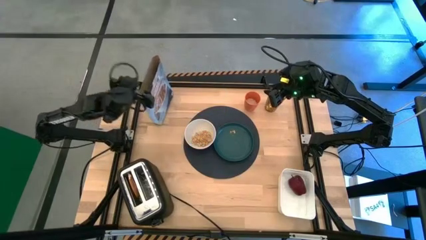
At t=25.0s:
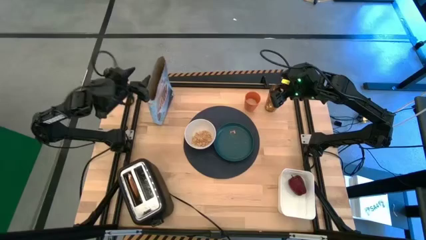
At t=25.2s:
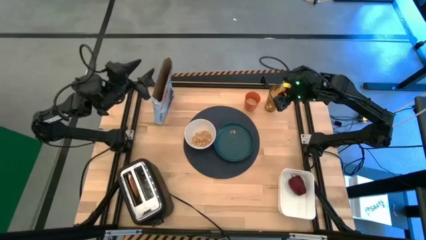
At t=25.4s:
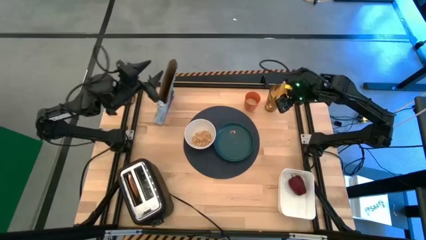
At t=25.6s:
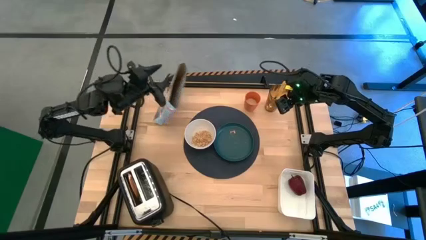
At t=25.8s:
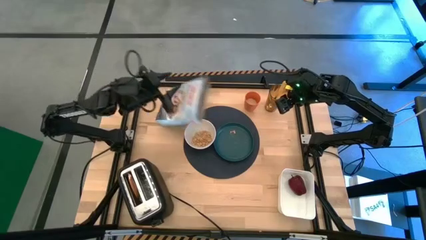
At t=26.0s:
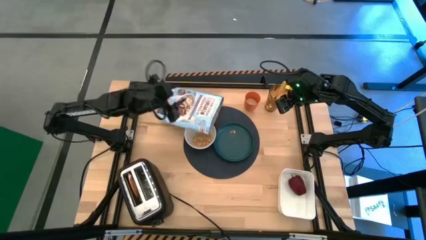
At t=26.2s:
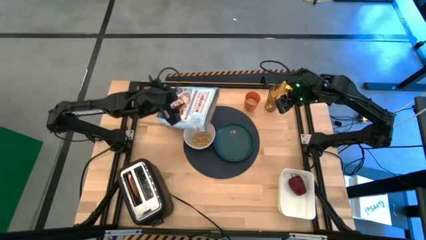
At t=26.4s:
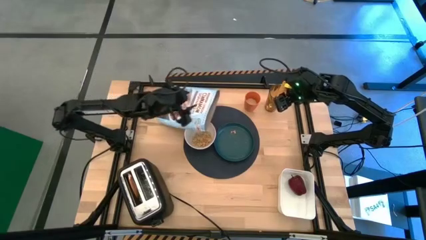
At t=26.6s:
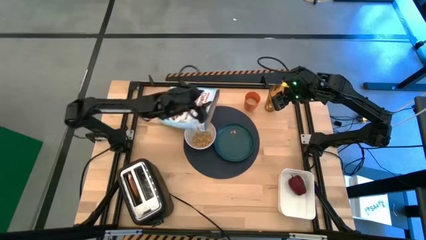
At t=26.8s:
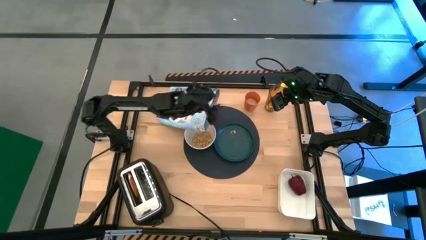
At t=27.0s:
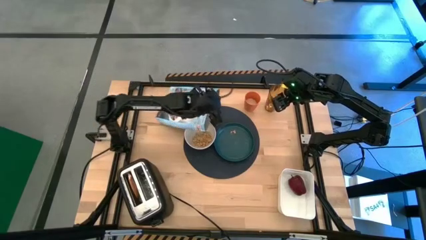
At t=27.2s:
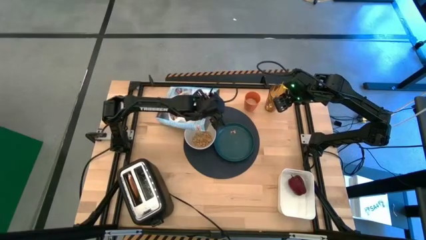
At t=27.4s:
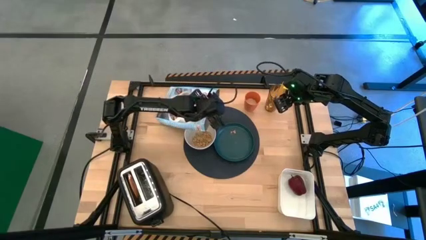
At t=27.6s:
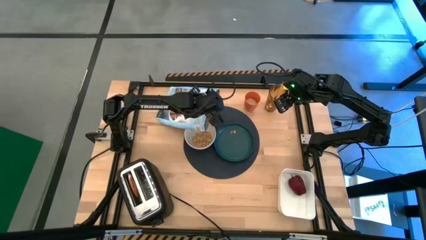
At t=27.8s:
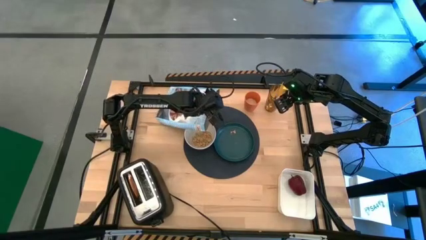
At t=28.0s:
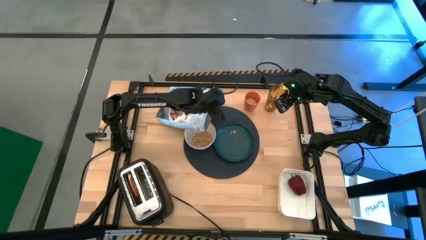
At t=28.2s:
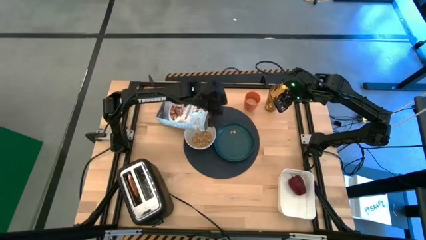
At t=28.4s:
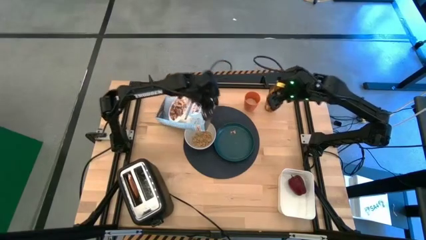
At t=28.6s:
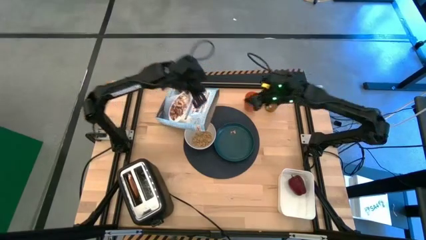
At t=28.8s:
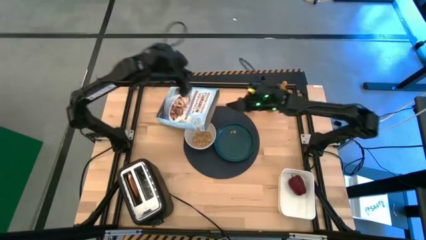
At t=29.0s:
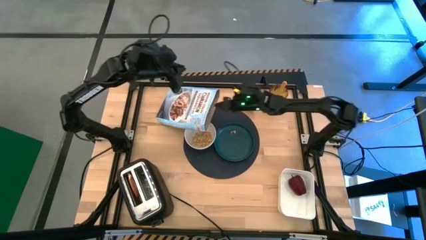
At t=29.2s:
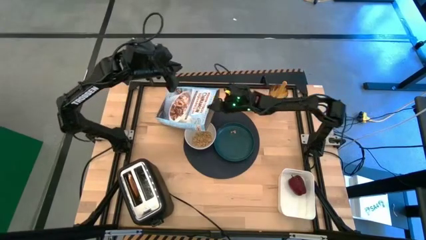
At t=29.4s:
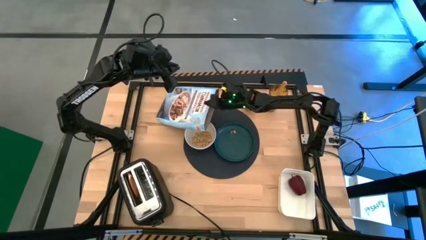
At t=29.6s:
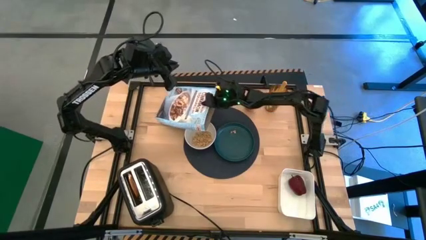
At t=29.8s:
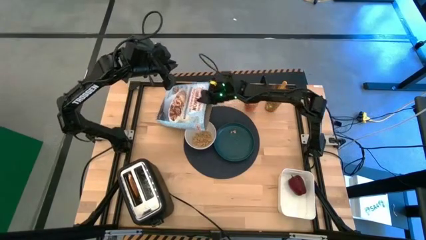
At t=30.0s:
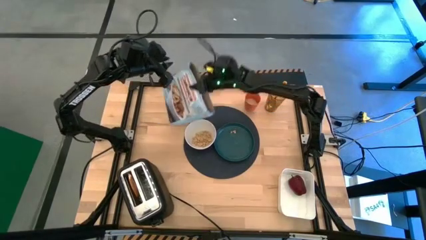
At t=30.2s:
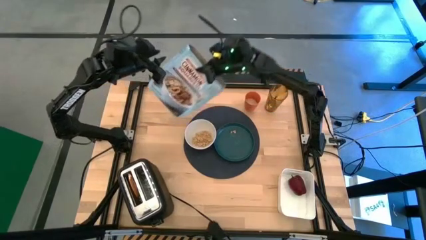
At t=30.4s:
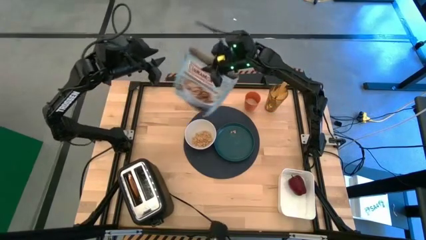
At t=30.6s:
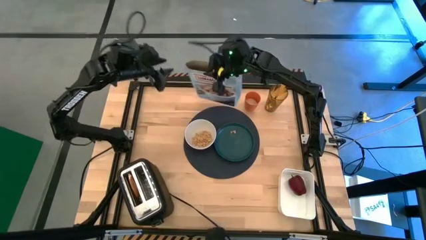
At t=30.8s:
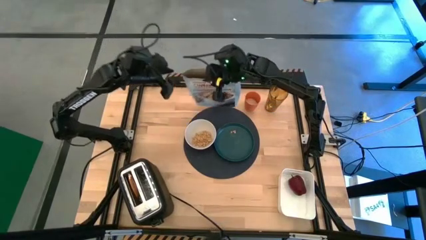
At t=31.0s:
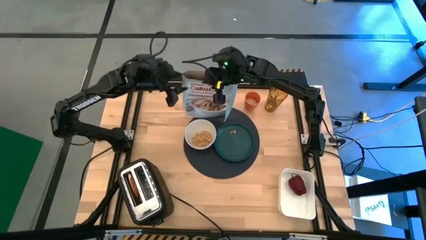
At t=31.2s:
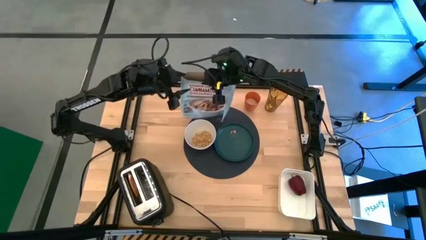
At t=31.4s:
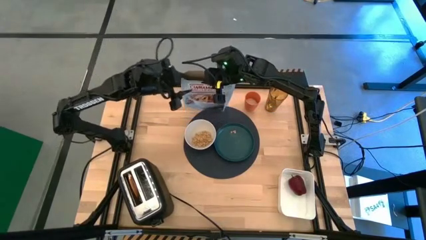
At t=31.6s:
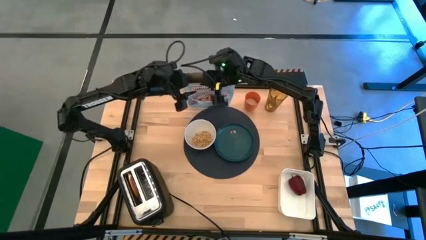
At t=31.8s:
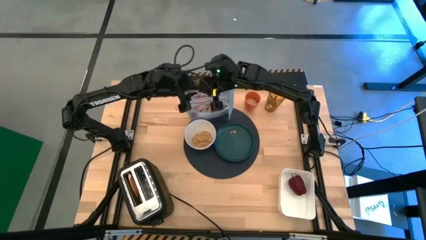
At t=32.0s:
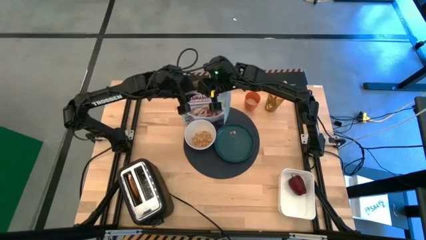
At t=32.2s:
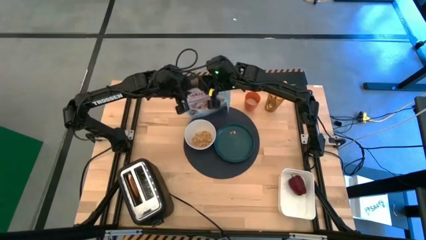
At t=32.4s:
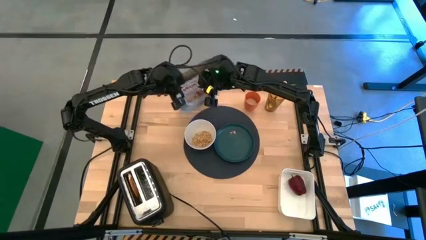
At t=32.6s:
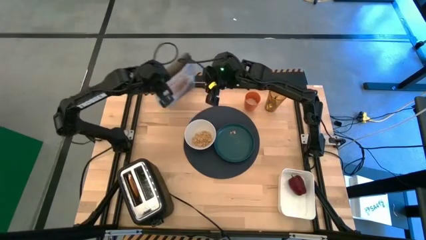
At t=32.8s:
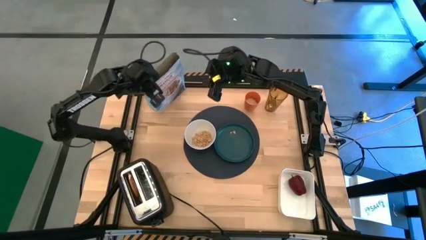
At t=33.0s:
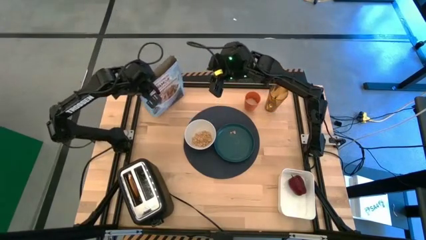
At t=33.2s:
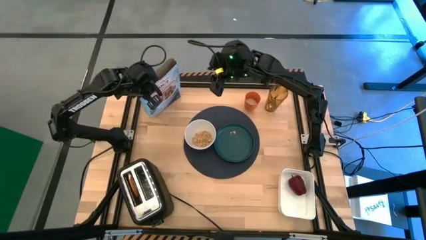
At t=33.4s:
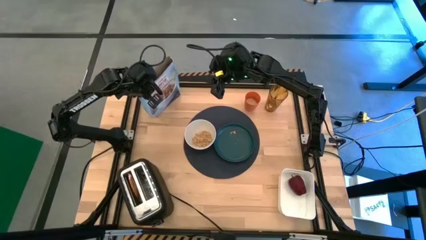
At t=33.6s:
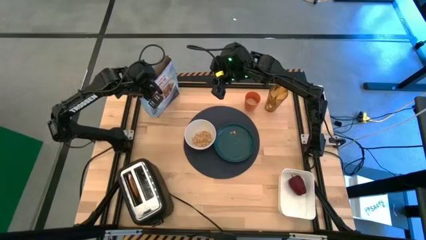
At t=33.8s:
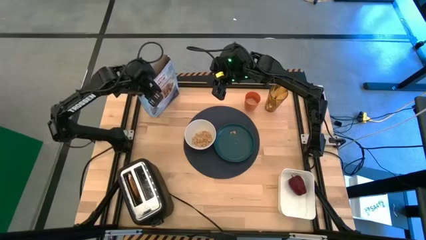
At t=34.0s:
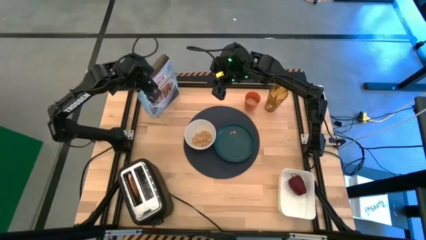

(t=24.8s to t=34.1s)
Task: Arrange a breakfast setting
Adjust the blue cereal box on the table

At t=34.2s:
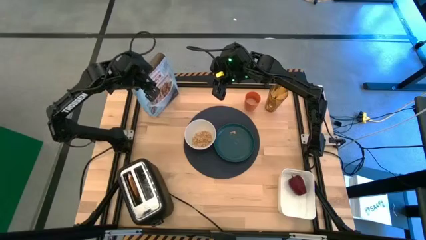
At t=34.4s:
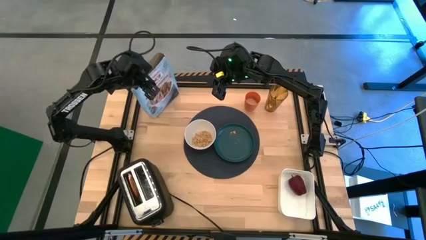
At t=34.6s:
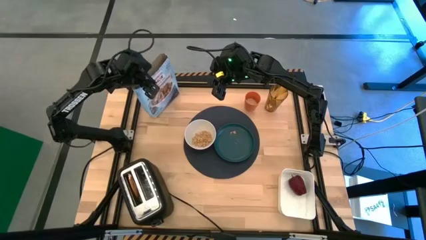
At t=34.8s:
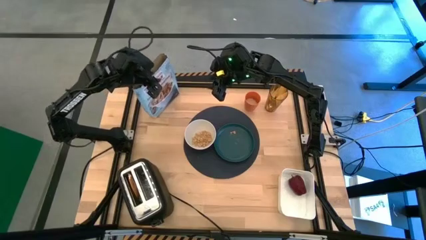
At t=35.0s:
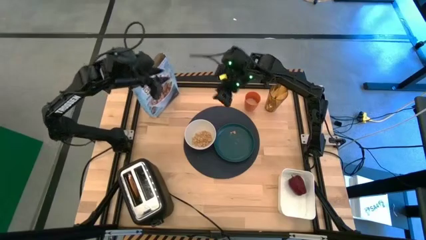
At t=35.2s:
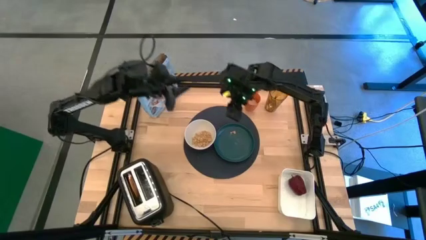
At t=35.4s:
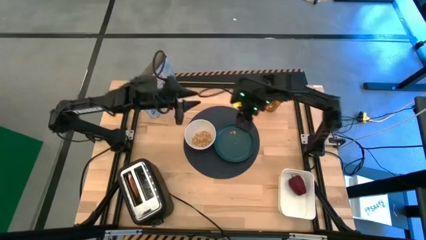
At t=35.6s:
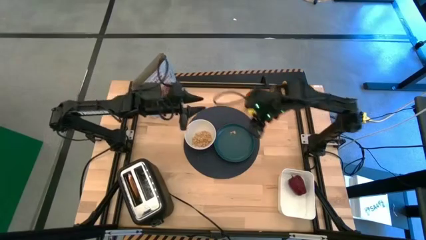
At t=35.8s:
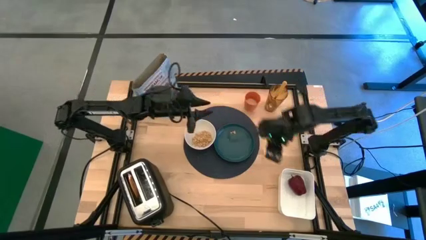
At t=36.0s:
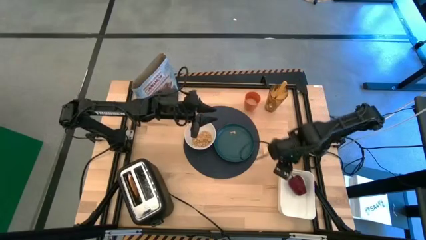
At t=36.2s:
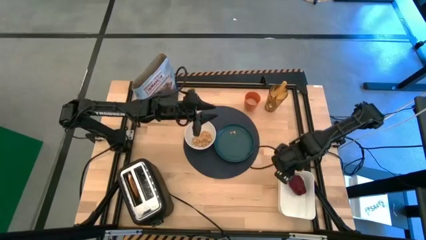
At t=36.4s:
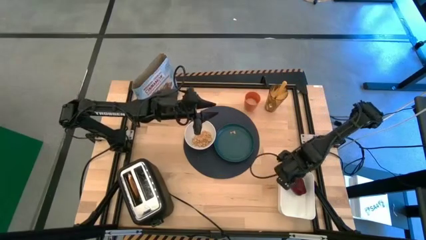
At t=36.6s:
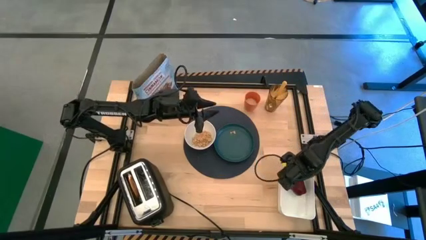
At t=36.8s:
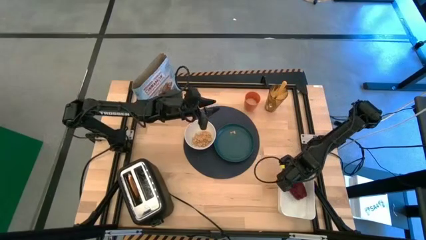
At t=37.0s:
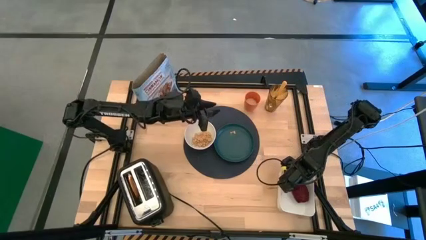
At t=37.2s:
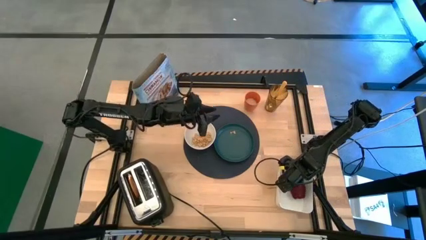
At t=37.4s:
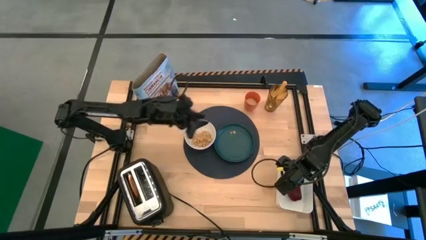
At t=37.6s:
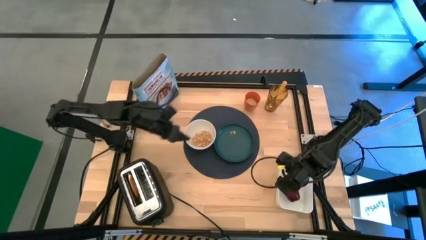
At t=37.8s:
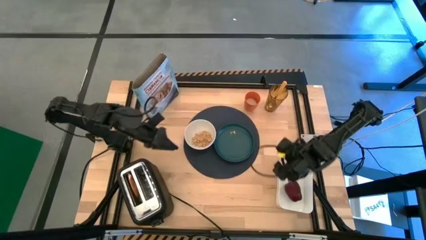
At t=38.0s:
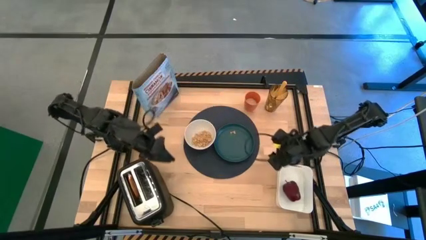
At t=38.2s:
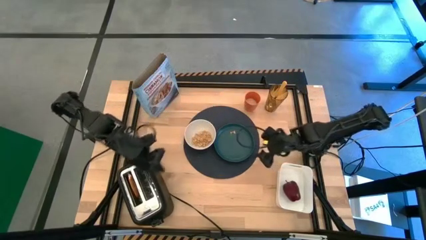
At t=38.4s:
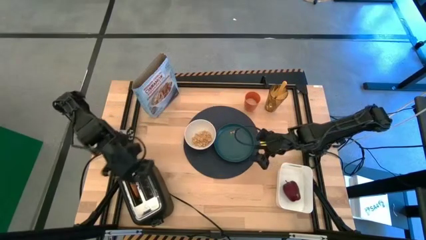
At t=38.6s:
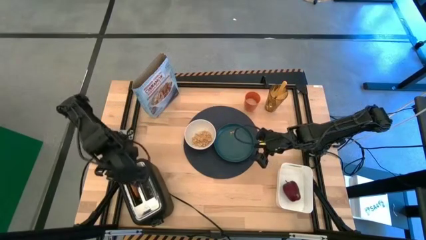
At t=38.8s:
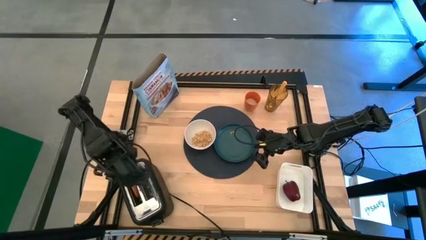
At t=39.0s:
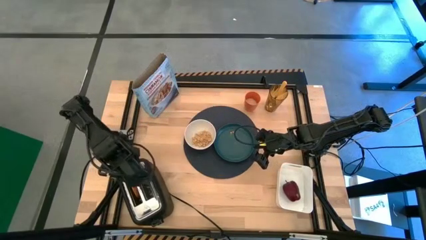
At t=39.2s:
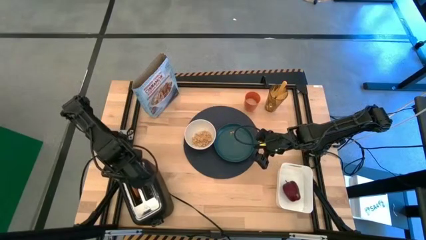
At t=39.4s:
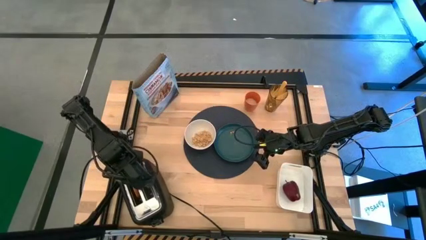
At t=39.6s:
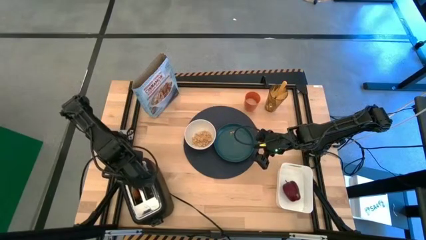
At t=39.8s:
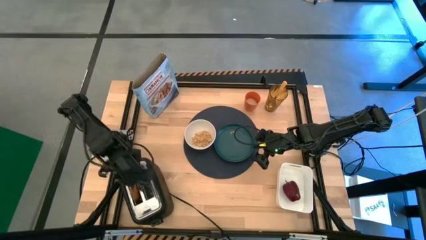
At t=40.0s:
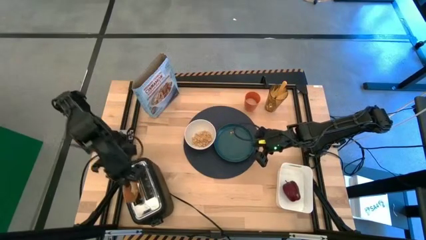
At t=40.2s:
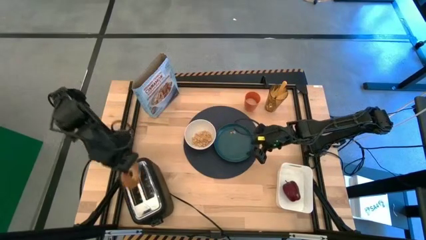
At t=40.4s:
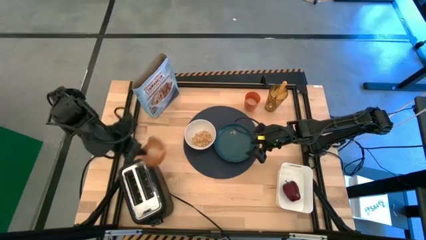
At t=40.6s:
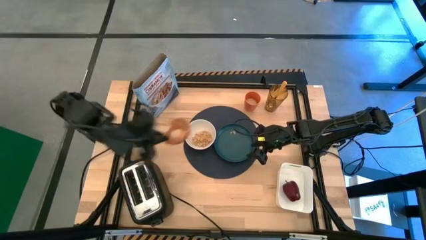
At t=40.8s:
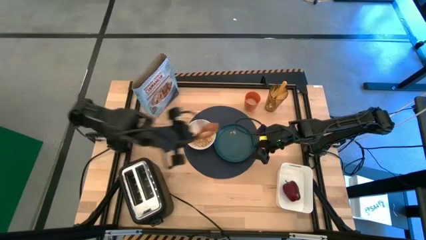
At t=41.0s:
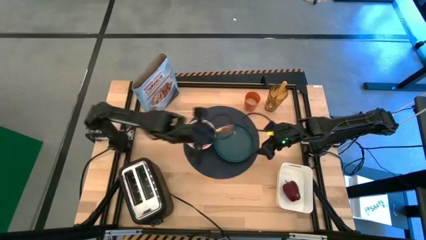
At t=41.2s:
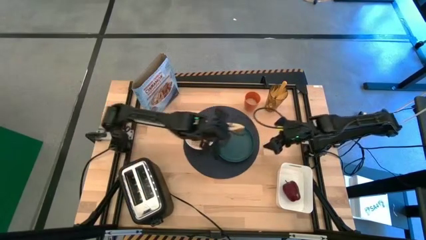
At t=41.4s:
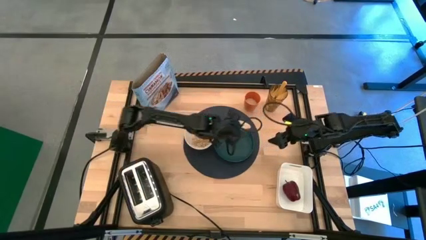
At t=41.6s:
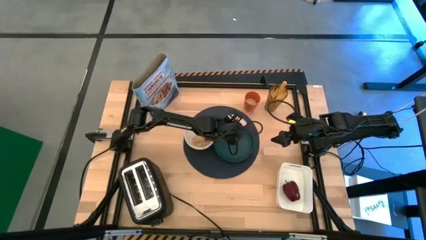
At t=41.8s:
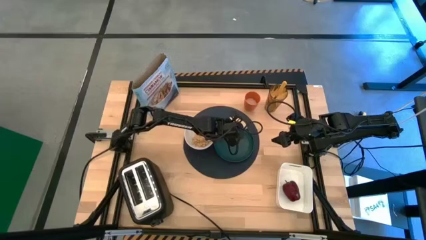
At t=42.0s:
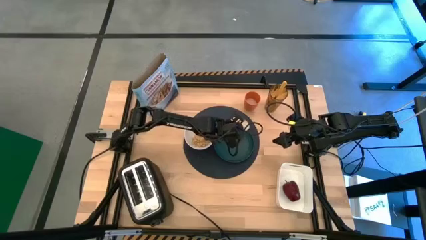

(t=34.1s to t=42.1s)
Put the toasted bagel on top of the green plate on the blue table mat
